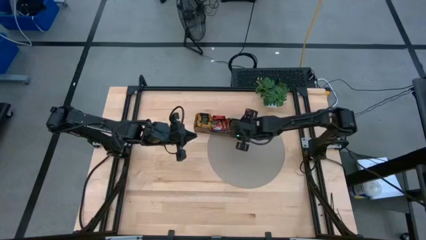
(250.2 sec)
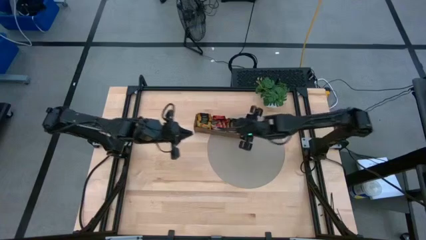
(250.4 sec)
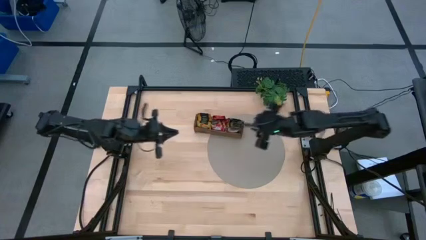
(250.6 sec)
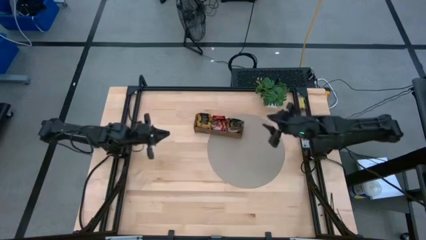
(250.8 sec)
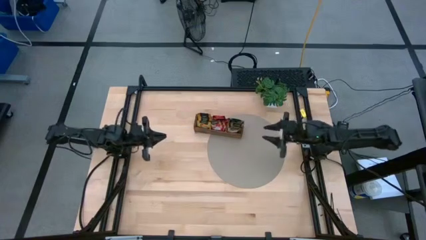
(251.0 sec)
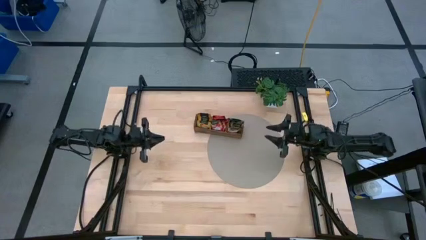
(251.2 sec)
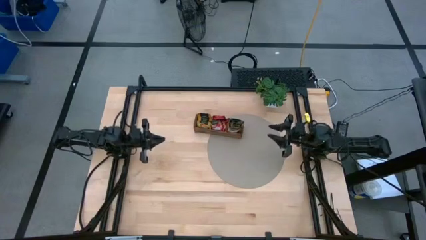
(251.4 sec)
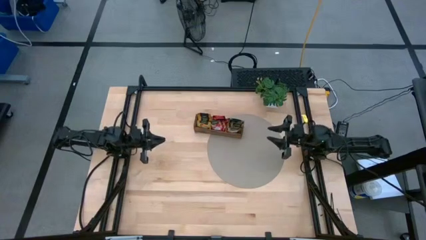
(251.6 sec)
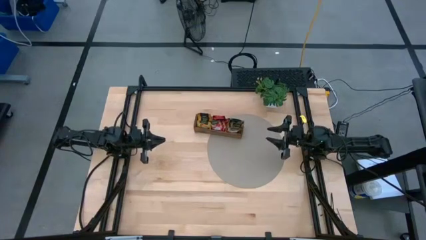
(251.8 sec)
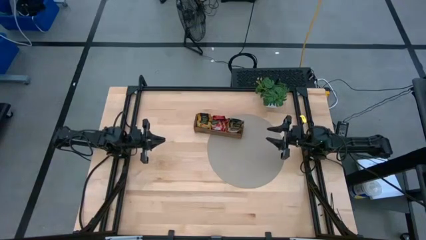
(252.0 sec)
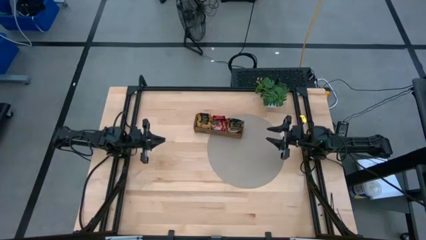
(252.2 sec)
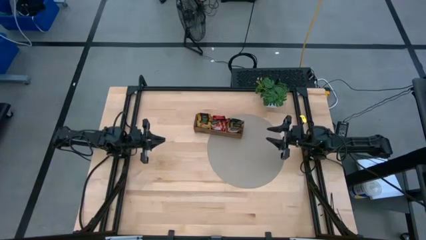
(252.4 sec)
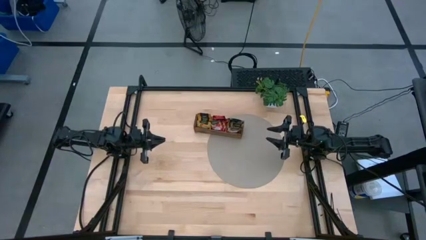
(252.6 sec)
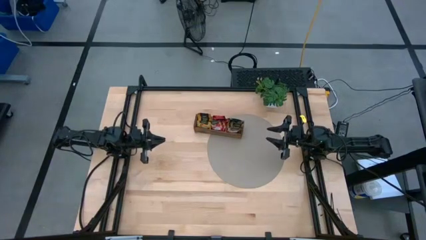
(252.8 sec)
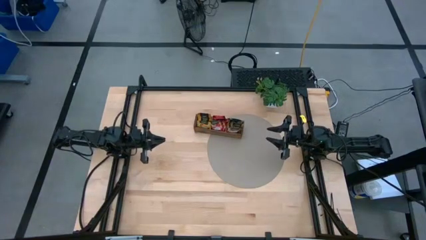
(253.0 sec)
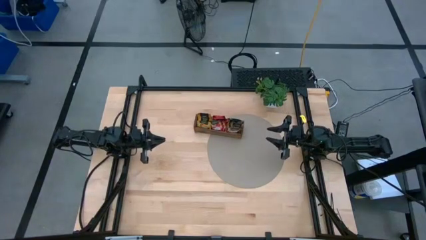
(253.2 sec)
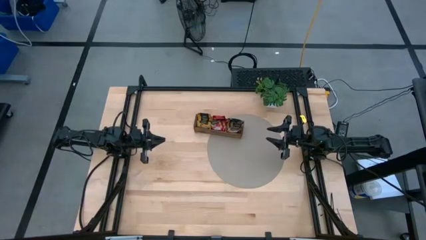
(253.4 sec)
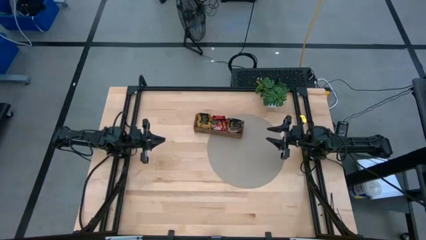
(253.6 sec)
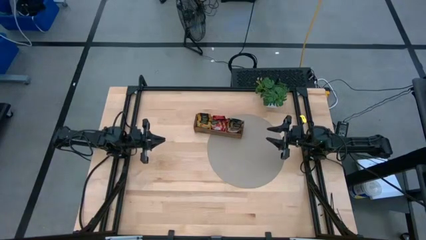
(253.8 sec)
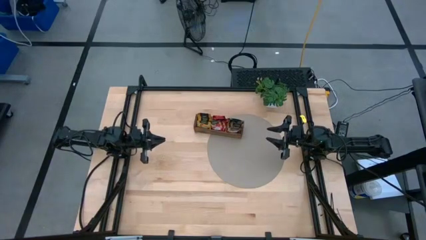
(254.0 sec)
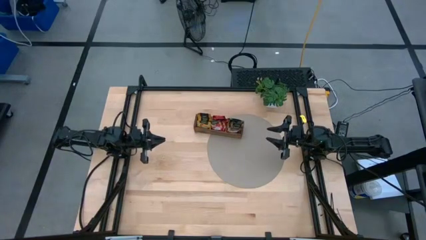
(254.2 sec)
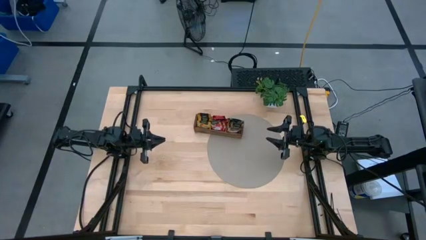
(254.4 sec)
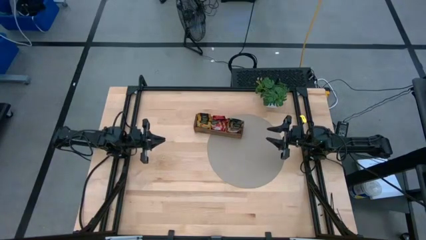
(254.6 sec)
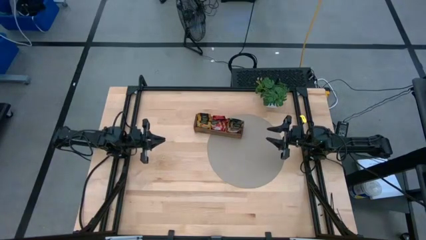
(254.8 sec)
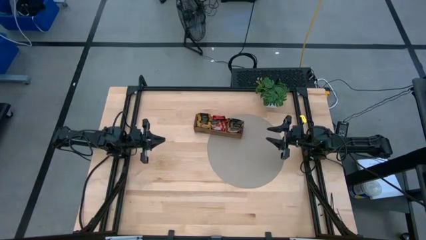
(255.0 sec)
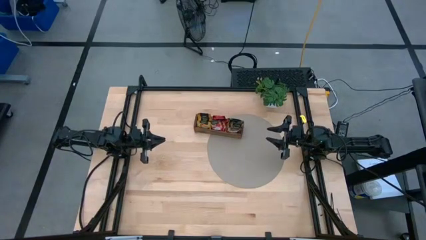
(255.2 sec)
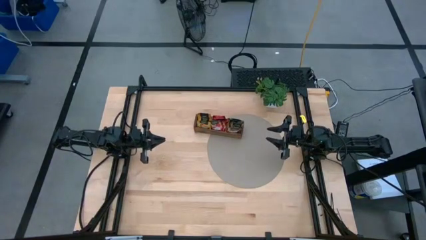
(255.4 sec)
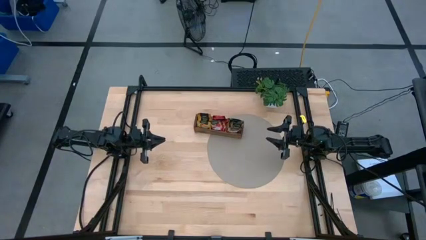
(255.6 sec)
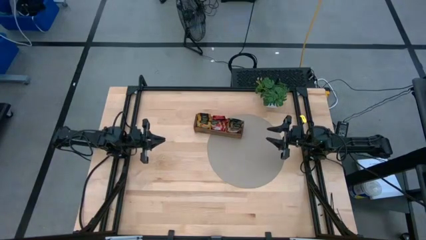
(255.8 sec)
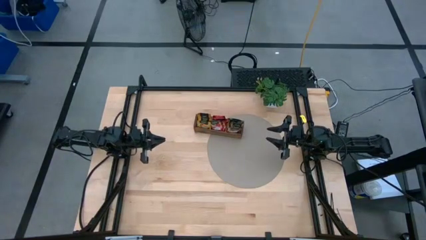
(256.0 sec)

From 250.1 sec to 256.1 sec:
Task: Pick & Place Tea
Return to Home Position

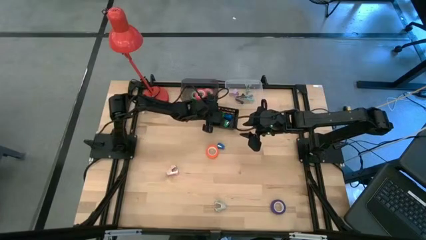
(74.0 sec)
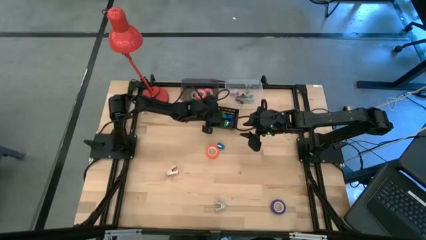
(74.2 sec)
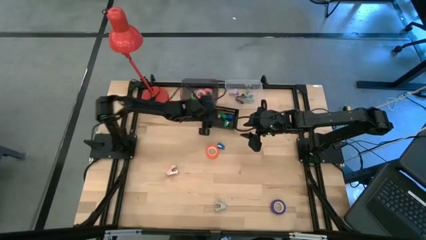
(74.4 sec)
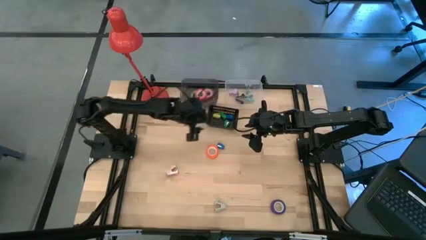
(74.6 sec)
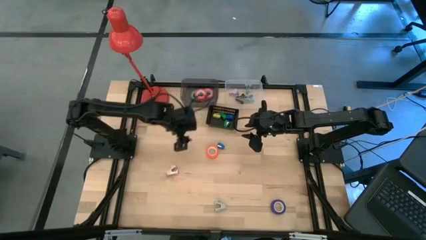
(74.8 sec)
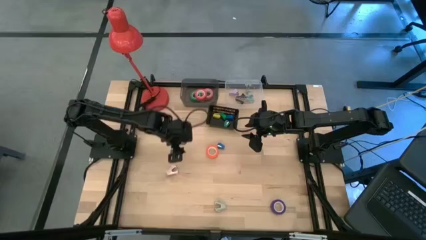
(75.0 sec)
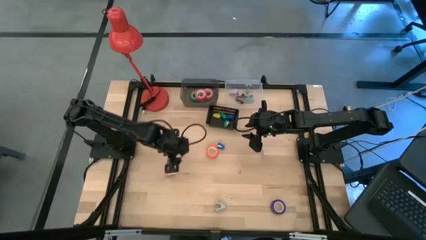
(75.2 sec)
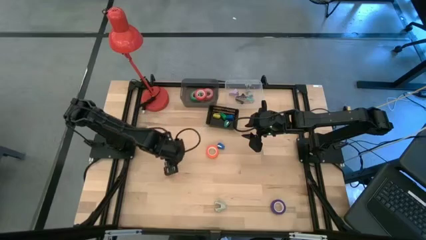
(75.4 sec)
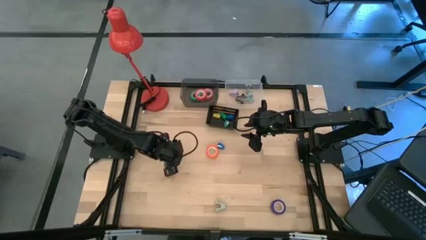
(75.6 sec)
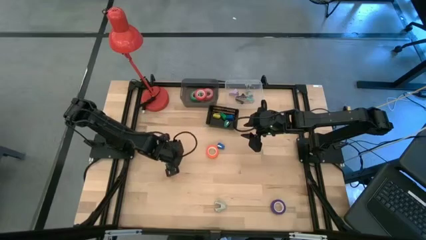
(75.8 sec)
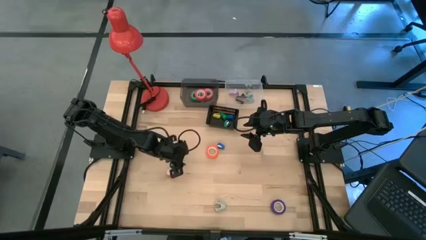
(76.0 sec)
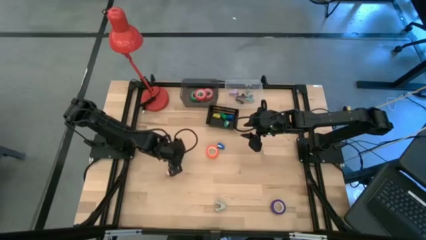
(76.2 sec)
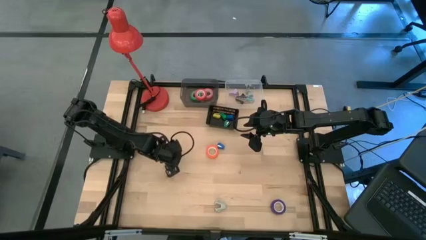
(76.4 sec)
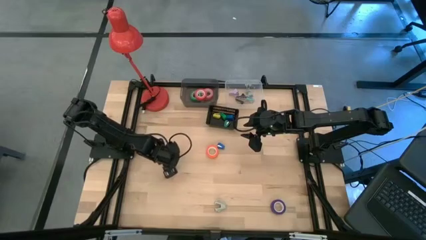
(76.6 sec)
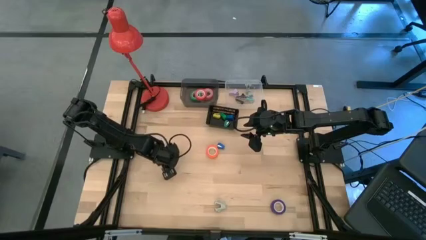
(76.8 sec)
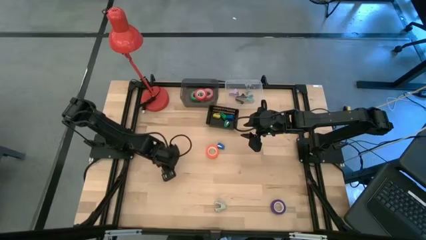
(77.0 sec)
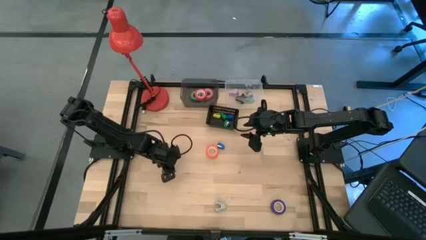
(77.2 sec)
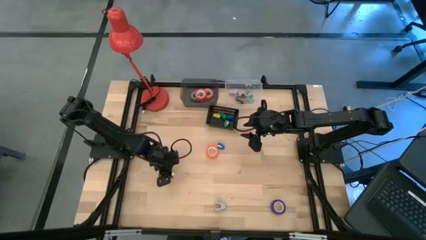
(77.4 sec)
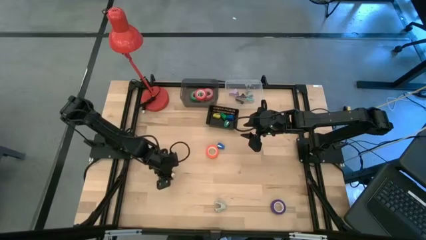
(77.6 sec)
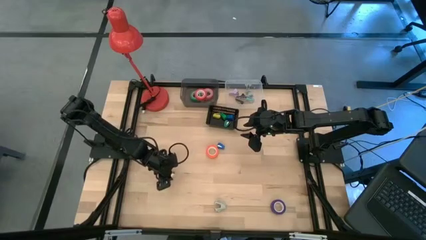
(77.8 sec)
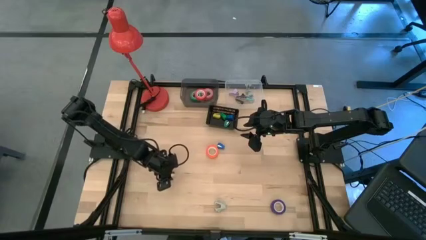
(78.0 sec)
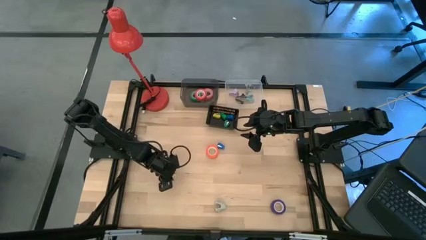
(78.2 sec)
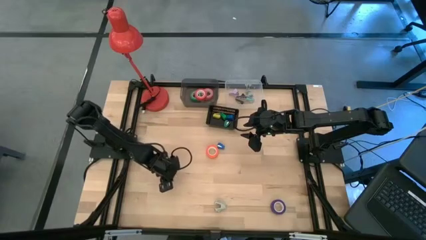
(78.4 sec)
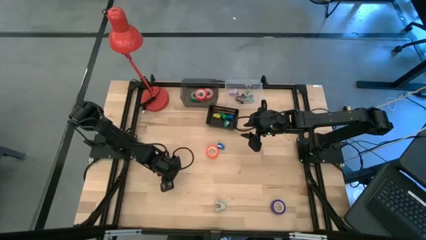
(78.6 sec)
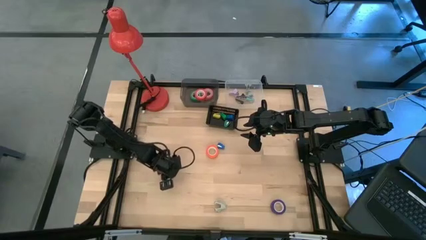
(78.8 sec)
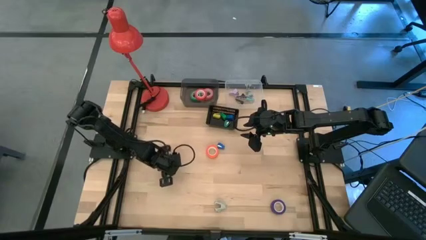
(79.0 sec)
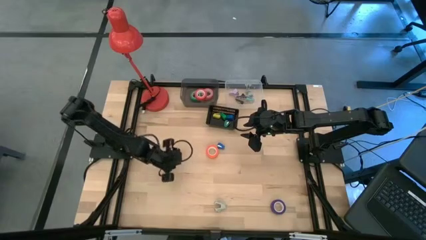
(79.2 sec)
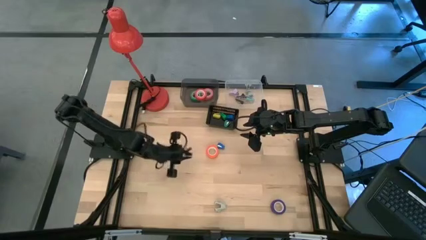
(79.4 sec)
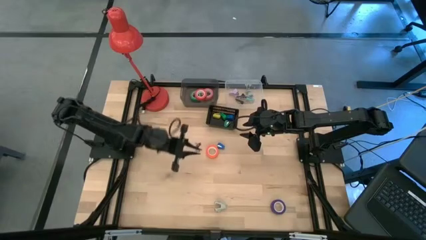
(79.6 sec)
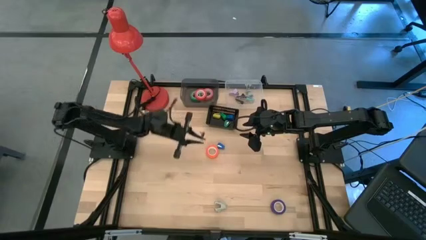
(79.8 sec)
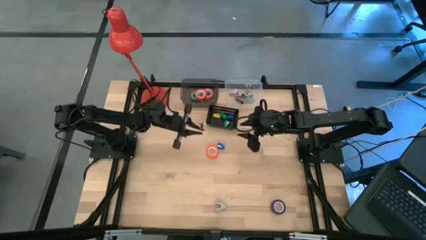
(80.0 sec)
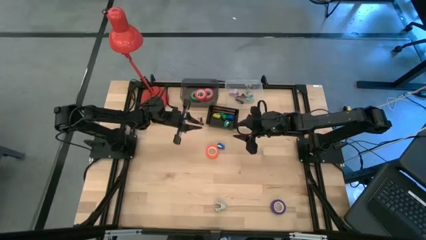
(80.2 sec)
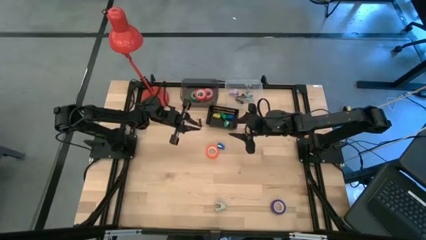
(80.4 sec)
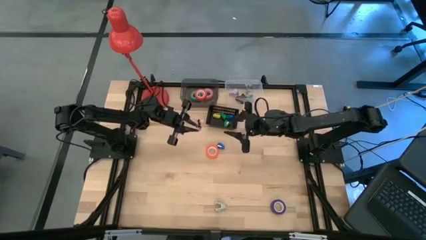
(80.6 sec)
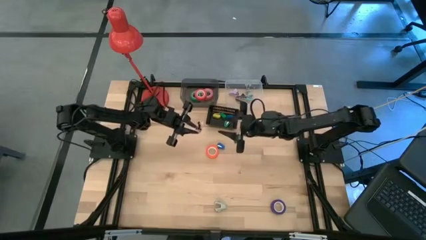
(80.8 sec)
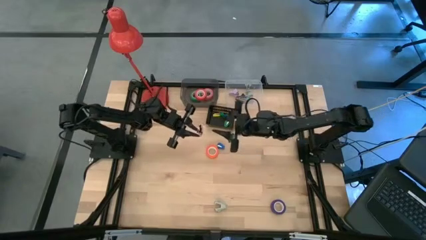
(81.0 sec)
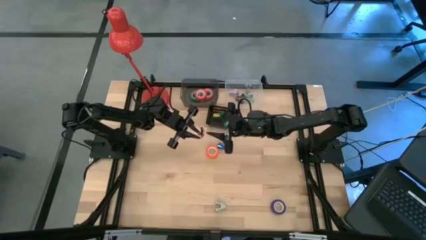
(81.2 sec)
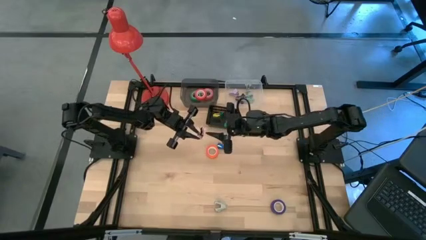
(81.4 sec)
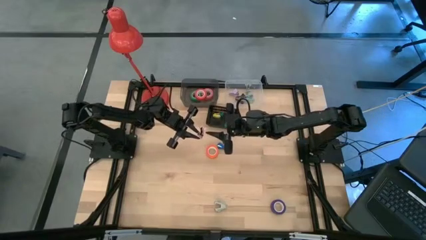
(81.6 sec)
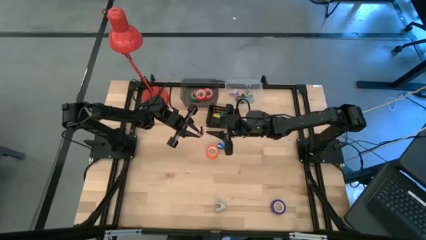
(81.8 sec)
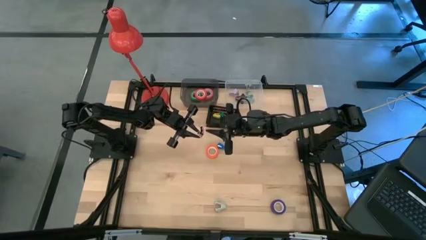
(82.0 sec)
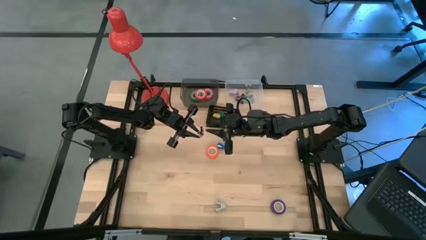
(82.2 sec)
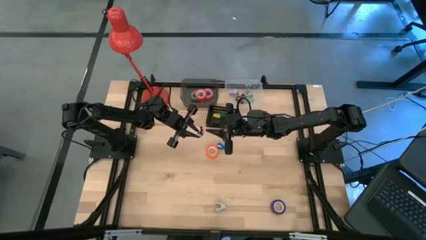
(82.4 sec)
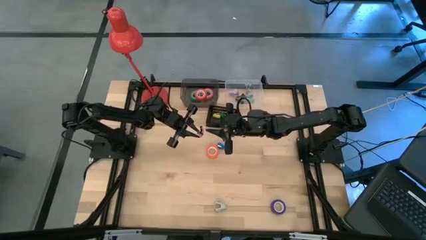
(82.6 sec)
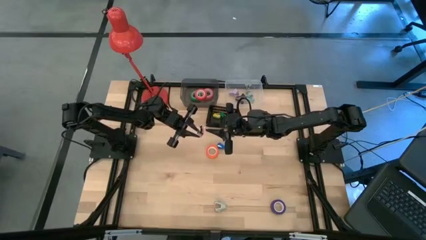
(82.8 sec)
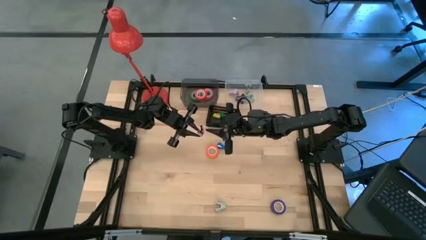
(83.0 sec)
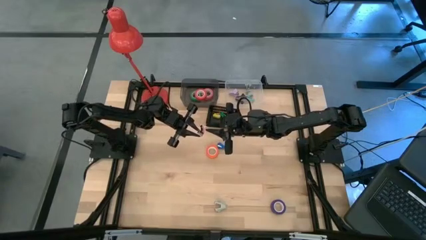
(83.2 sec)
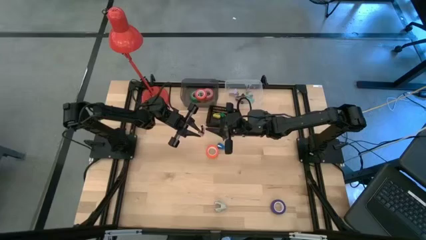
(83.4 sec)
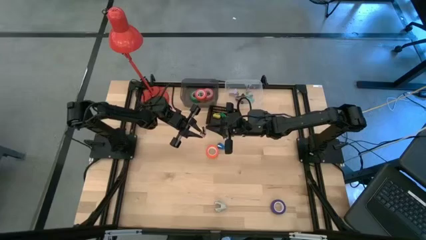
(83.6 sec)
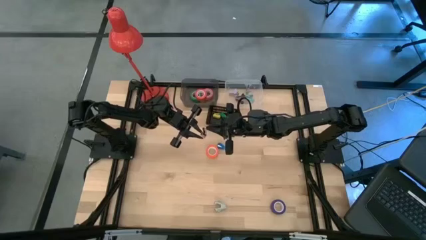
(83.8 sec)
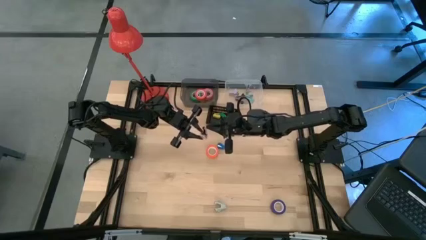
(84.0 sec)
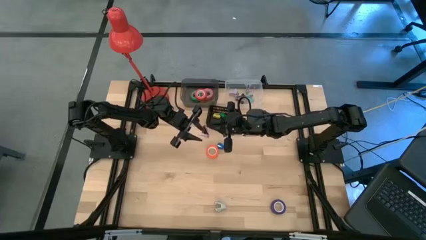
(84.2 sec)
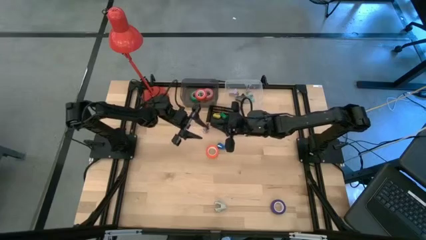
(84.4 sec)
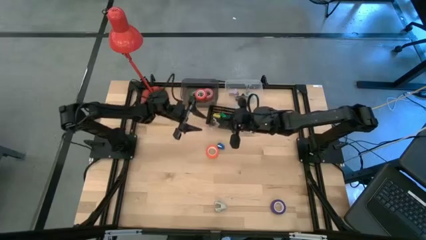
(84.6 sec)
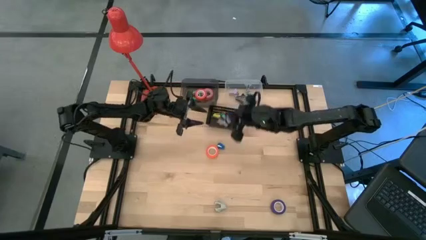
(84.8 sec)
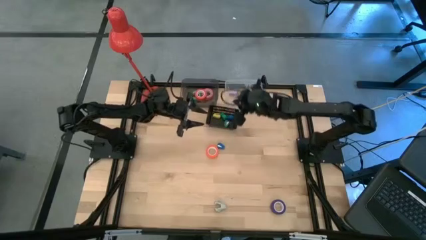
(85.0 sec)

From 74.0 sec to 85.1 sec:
Task: Pick and place Stapler, Stapler remover, tape
Put the pink staple remover into the transparent bin
